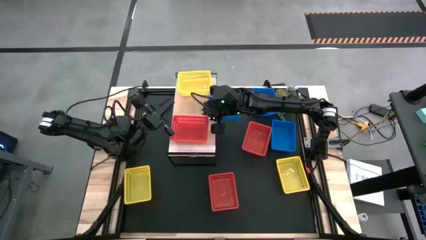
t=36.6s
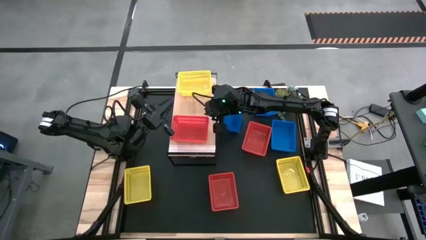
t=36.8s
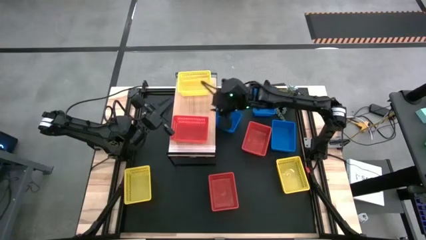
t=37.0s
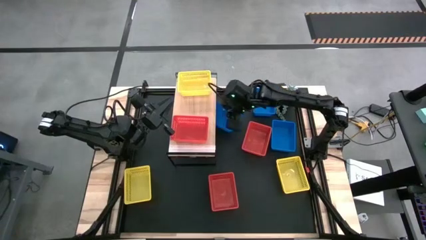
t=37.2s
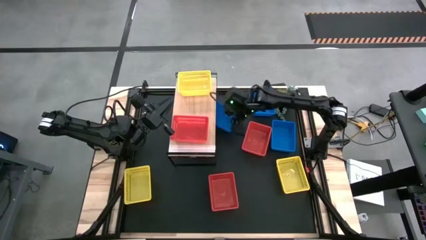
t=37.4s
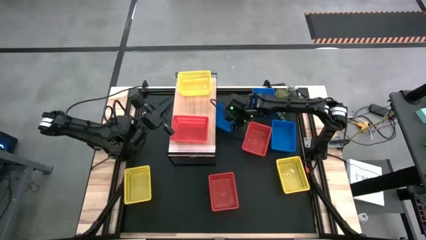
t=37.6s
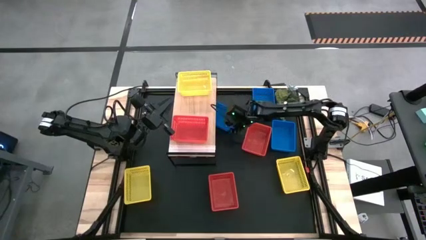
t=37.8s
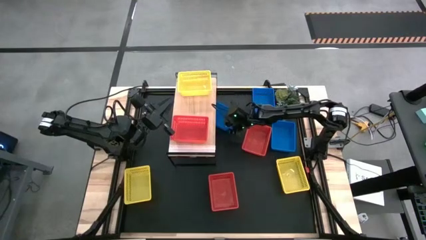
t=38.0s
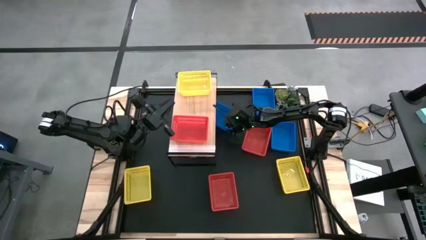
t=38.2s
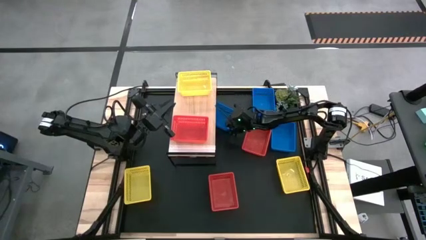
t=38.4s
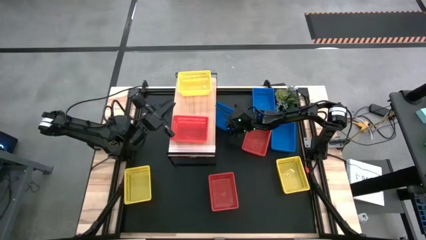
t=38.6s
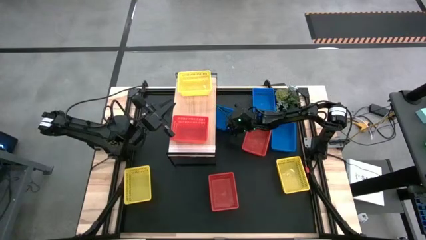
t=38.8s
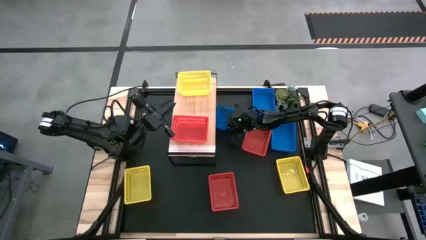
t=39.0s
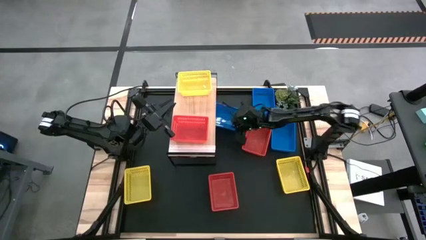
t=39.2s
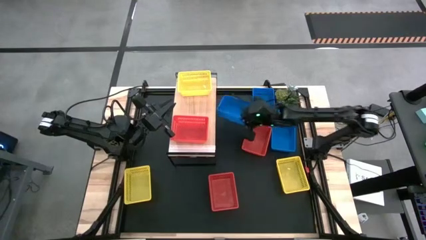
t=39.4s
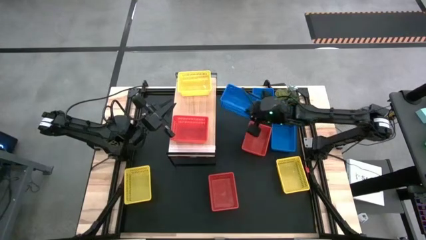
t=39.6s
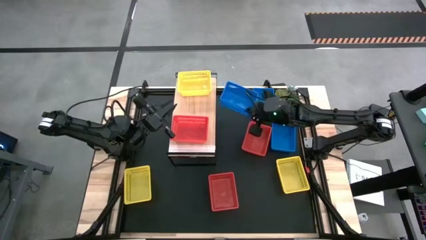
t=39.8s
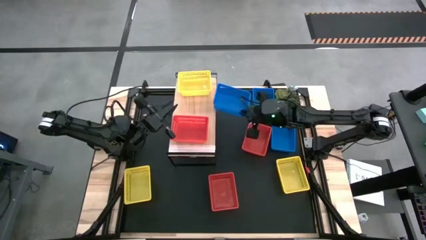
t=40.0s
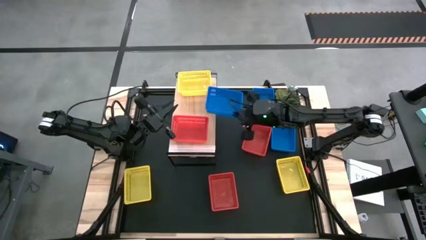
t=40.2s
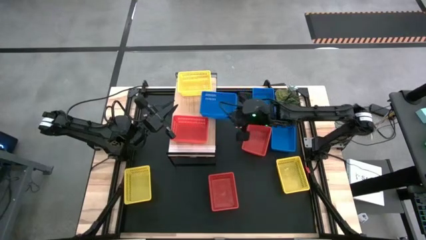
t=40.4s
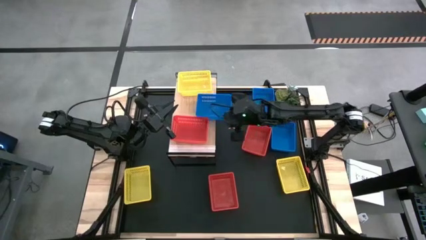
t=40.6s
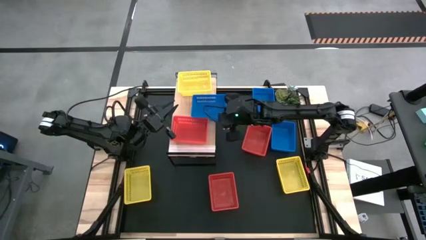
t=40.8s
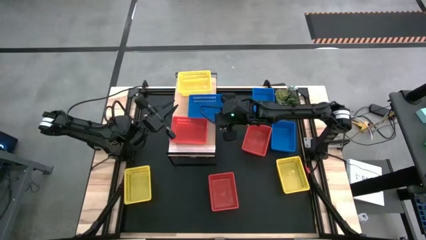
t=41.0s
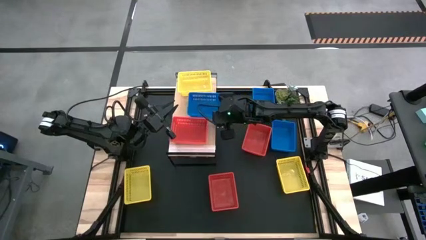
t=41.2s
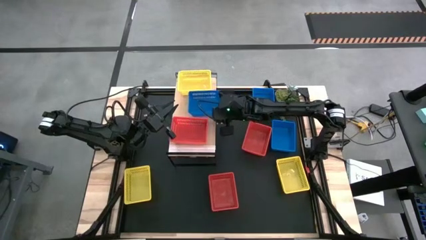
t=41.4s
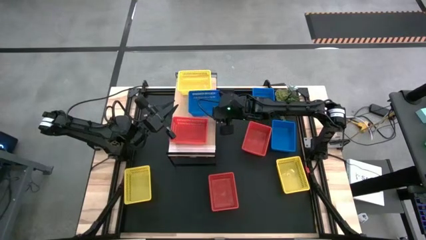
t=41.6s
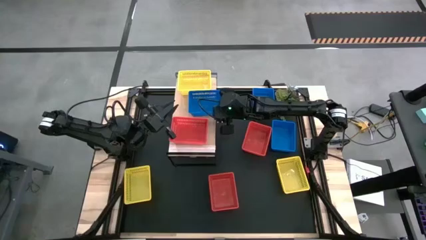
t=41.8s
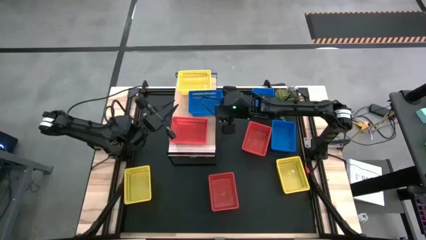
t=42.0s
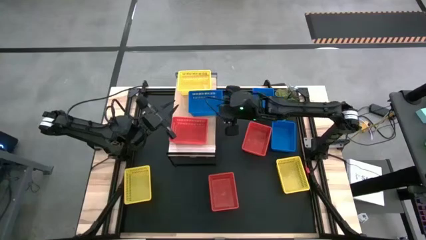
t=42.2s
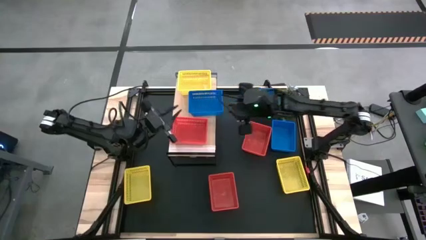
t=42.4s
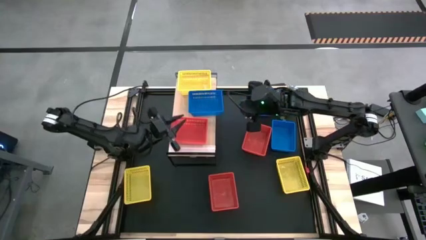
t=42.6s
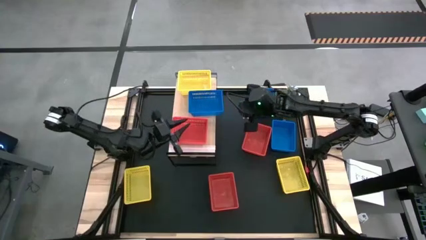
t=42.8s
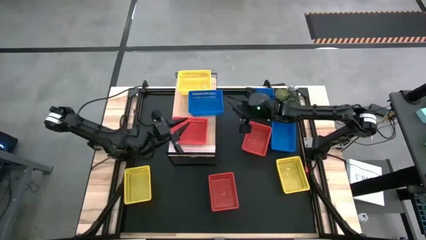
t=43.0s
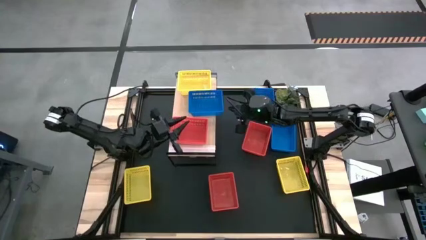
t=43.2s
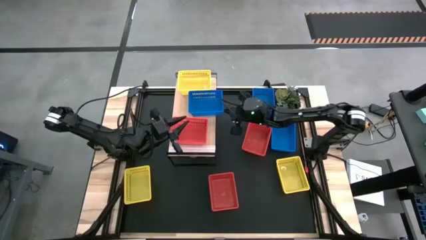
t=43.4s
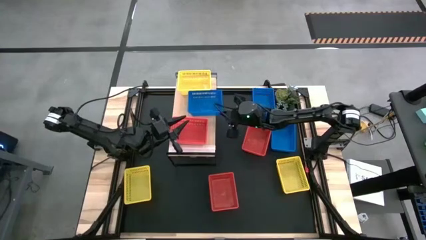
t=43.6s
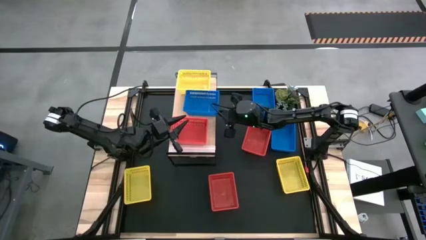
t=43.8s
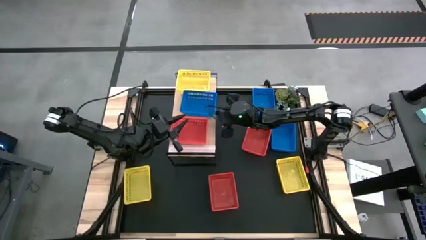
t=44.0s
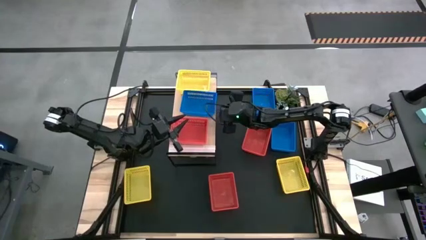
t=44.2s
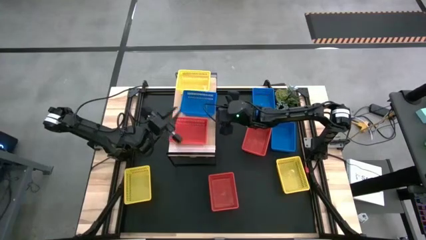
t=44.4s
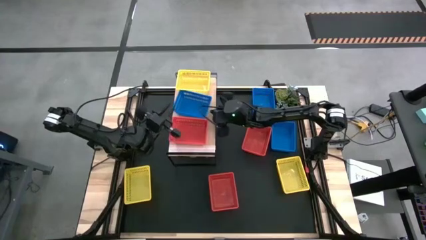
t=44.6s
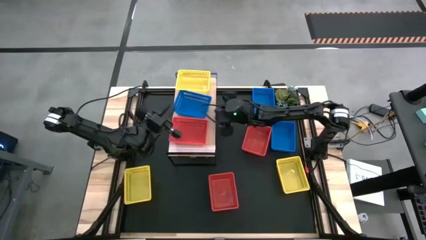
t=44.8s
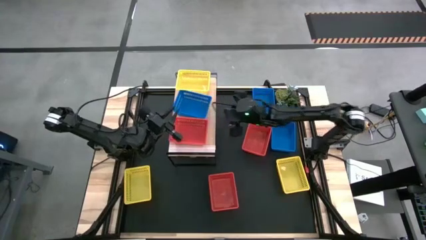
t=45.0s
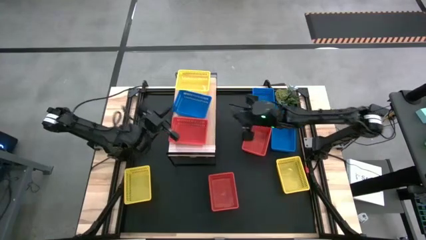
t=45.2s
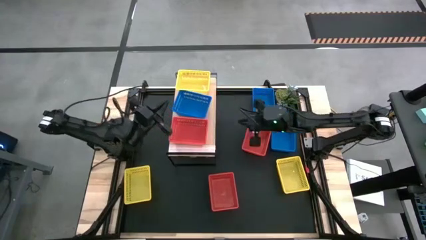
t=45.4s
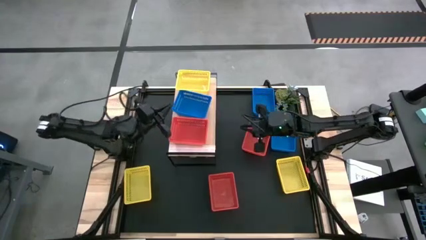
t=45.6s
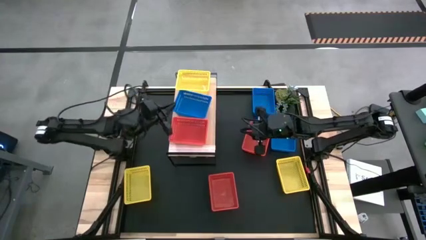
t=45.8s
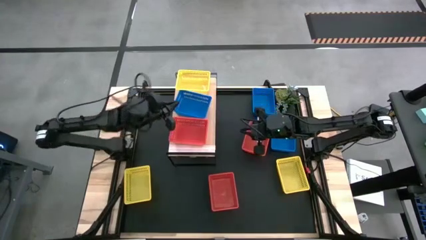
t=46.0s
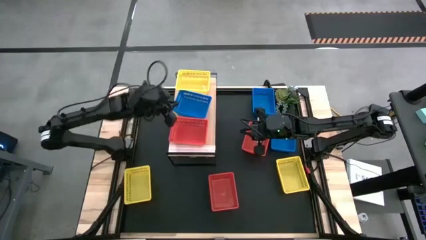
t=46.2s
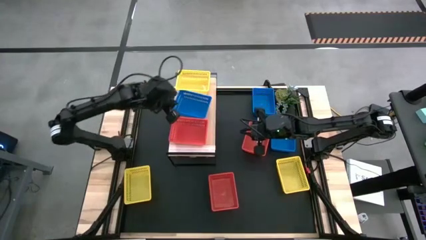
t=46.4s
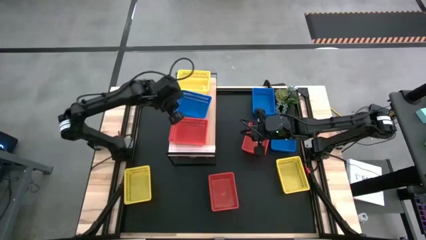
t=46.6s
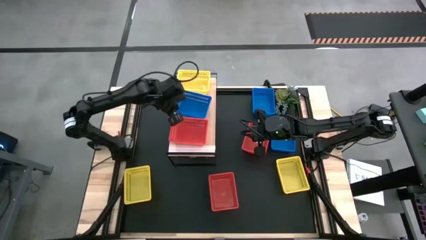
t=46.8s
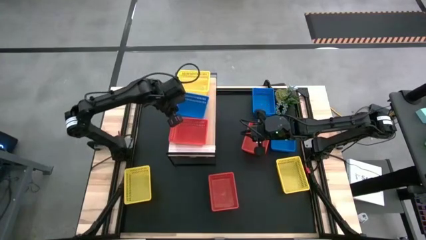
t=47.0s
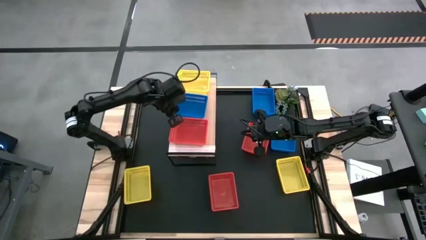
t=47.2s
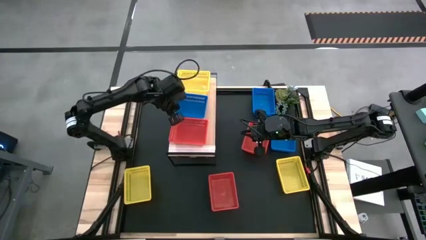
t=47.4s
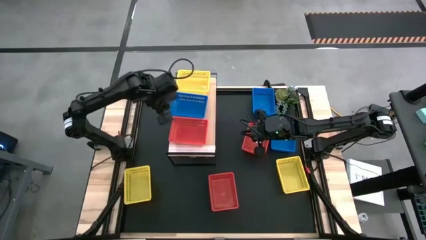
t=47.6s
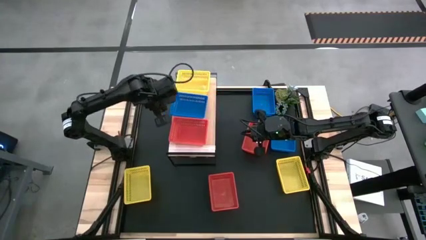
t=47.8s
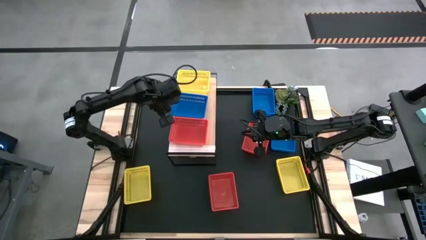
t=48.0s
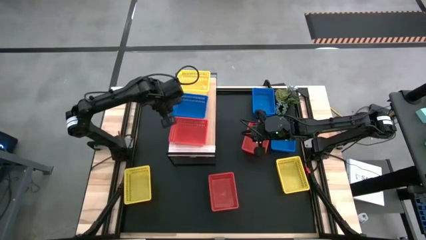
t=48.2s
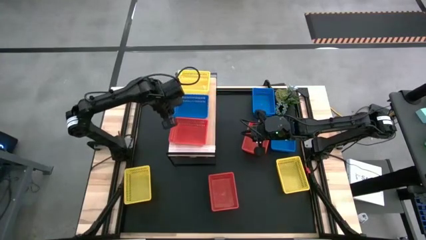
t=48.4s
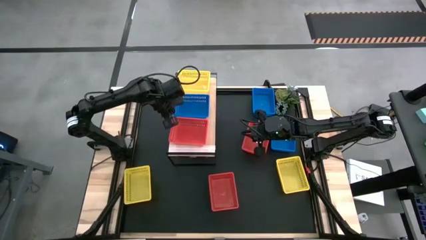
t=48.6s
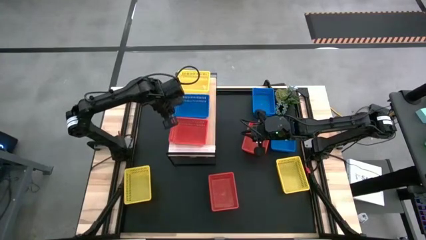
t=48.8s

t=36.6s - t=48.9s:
Task: Stack baskets on shelf by color
Put the top left blue bin on the shelf

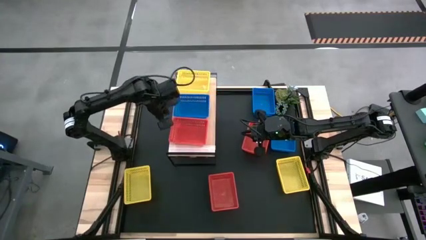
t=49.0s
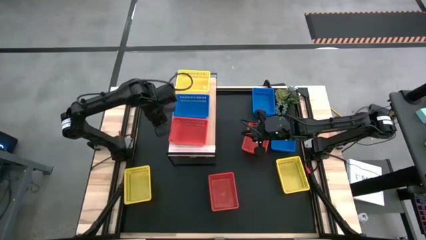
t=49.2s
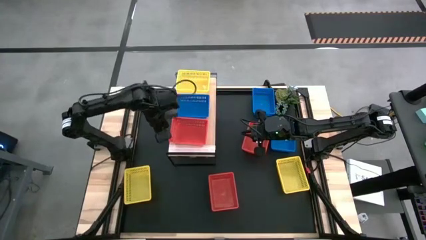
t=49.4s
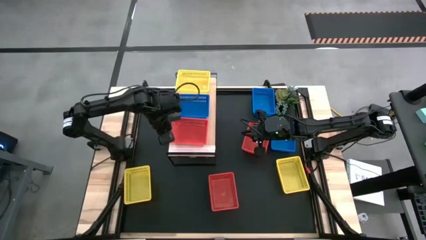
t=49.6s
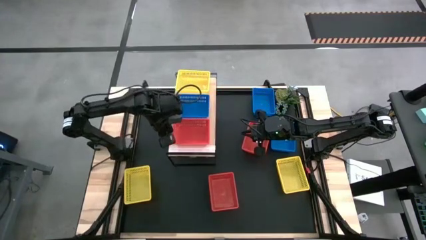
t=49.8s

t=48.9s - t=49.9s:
Adjust the red bin on the shelf
